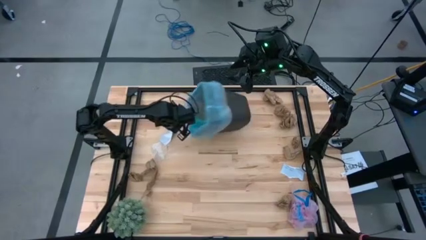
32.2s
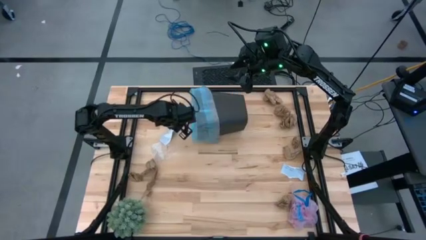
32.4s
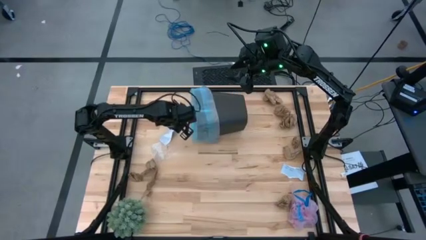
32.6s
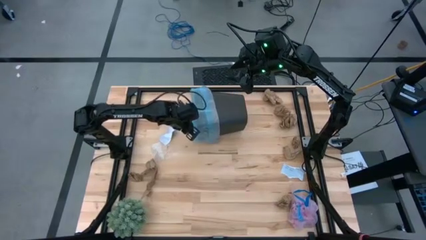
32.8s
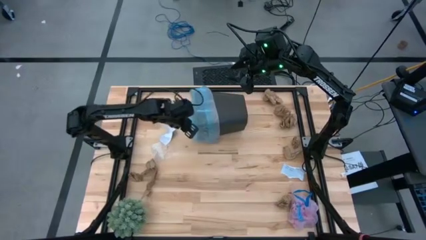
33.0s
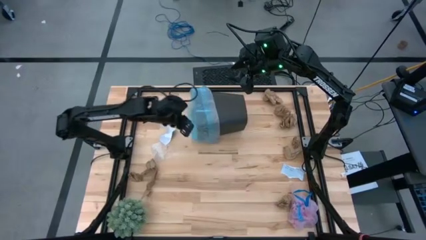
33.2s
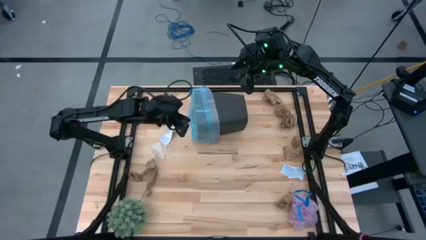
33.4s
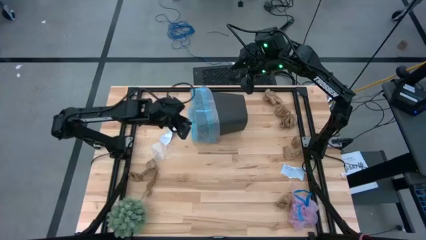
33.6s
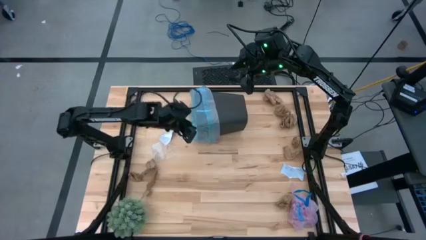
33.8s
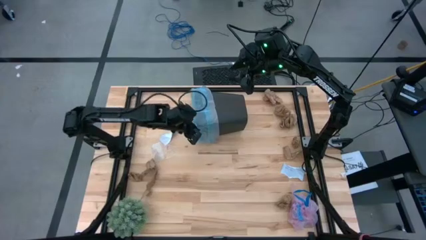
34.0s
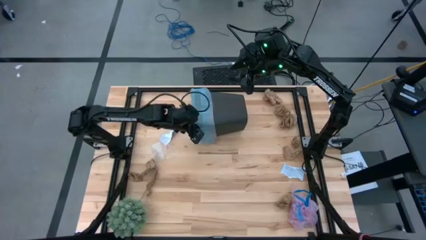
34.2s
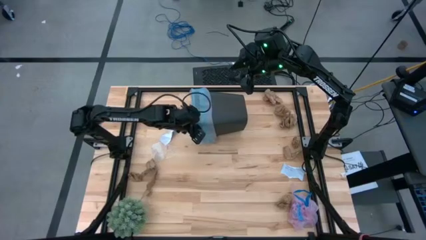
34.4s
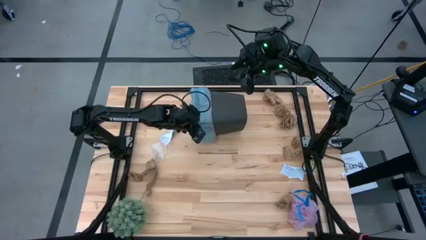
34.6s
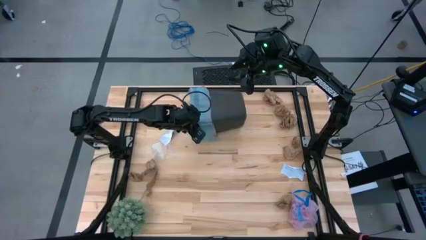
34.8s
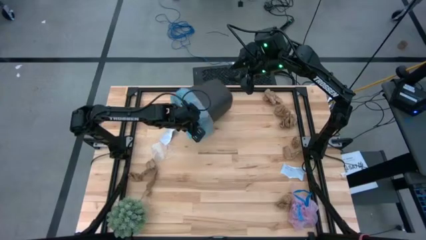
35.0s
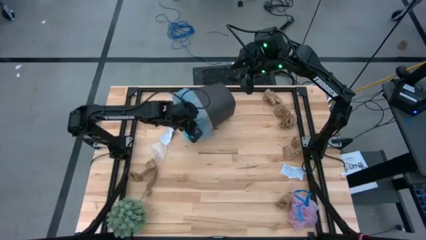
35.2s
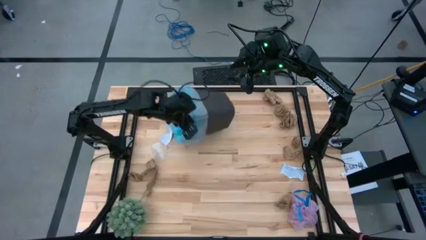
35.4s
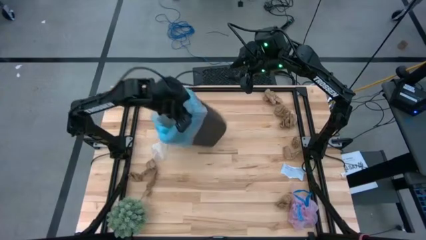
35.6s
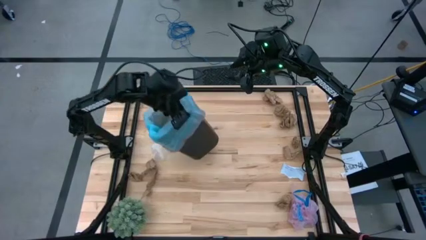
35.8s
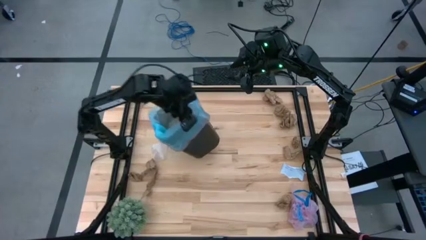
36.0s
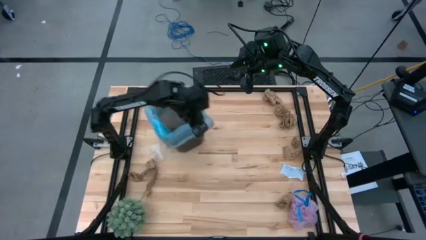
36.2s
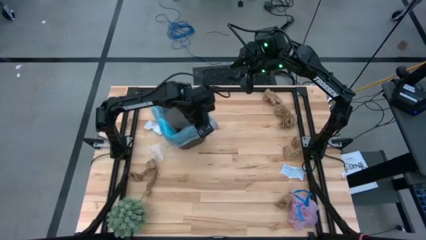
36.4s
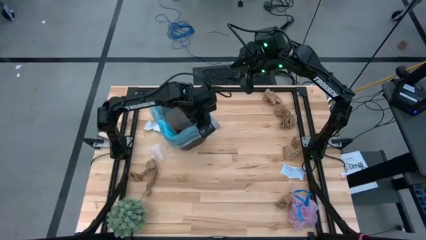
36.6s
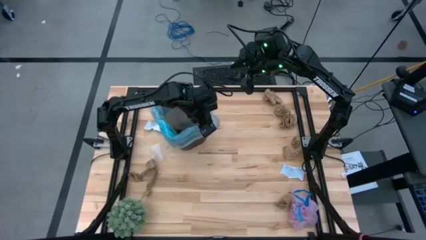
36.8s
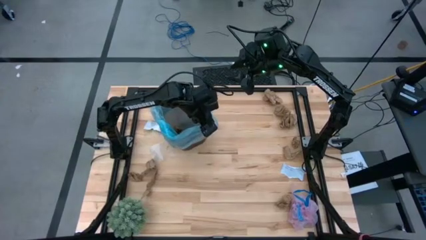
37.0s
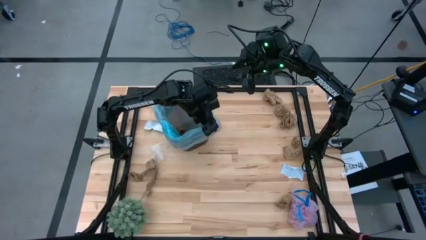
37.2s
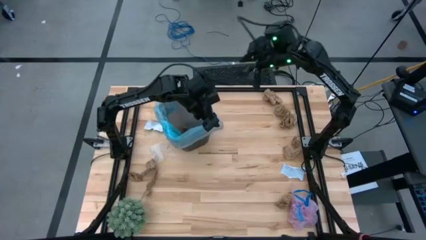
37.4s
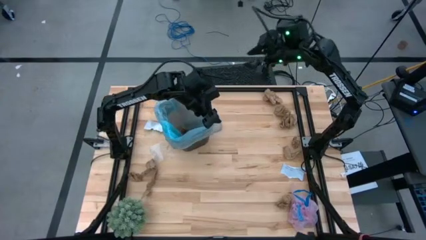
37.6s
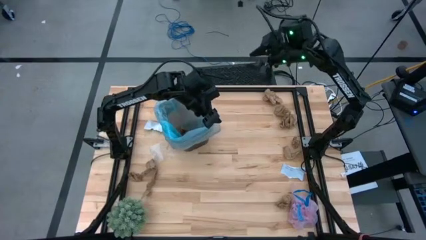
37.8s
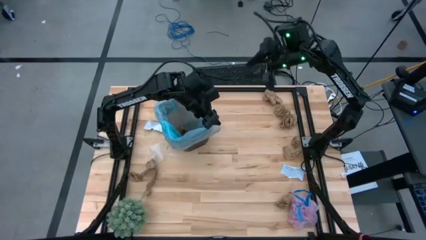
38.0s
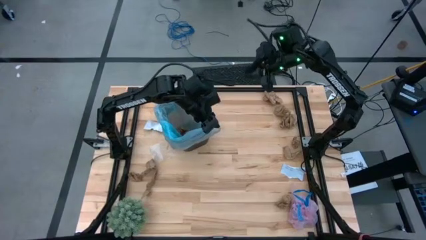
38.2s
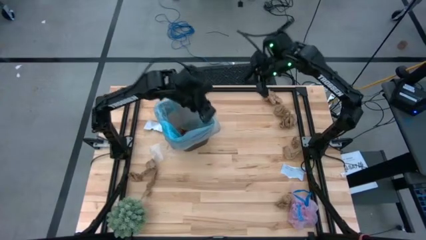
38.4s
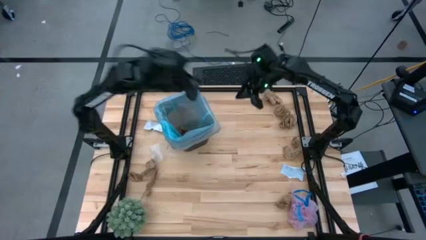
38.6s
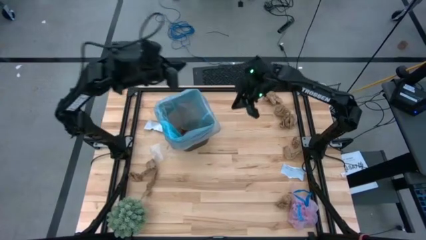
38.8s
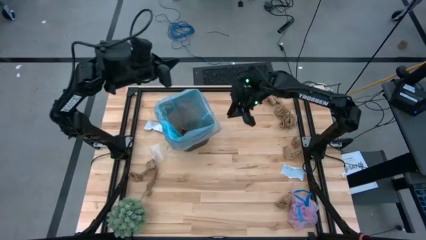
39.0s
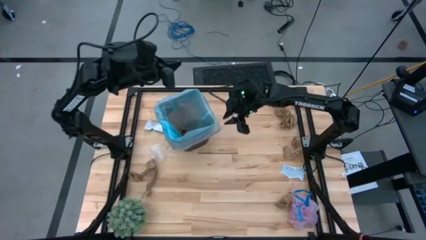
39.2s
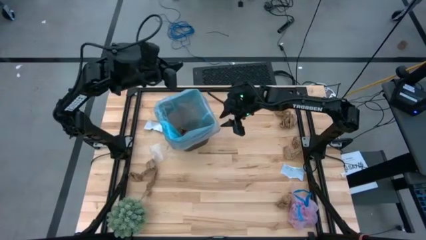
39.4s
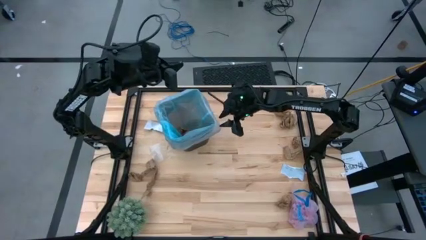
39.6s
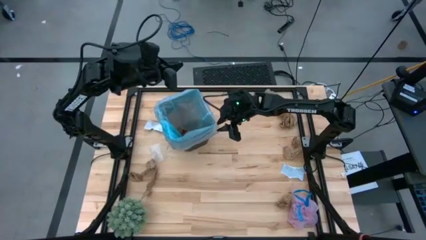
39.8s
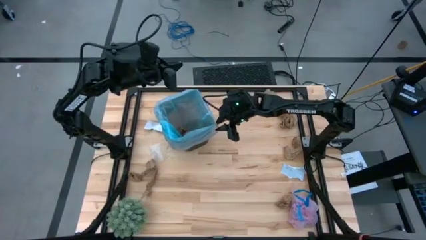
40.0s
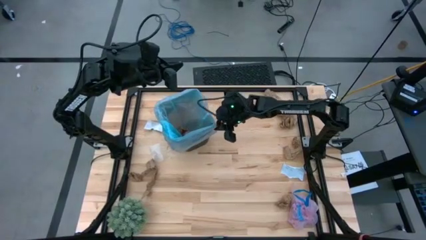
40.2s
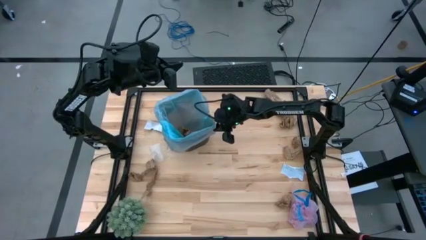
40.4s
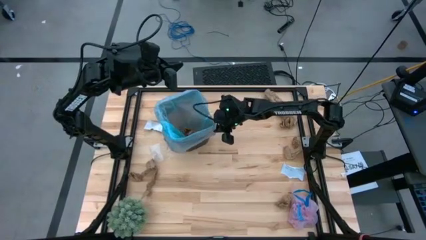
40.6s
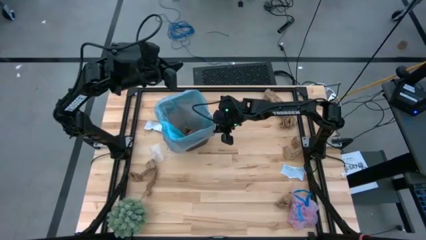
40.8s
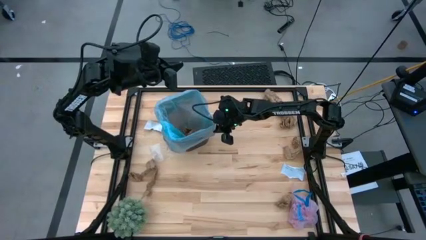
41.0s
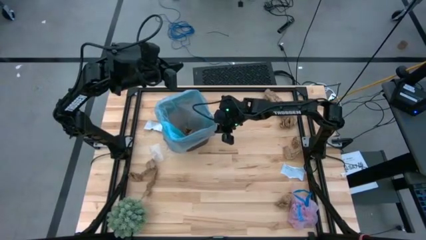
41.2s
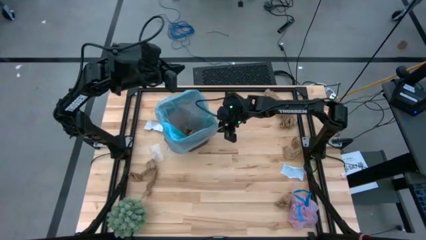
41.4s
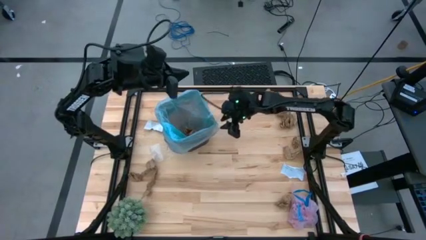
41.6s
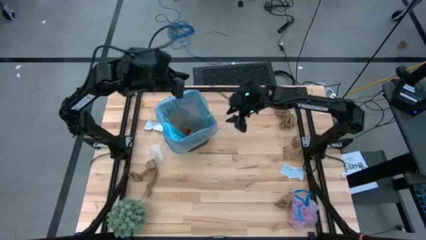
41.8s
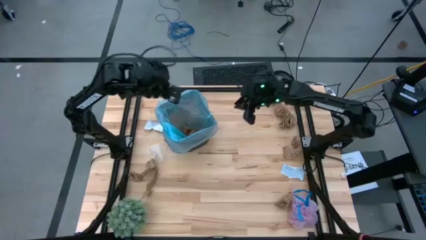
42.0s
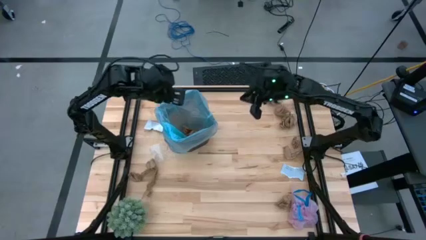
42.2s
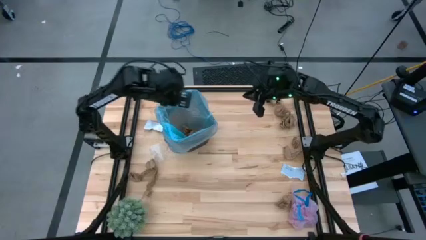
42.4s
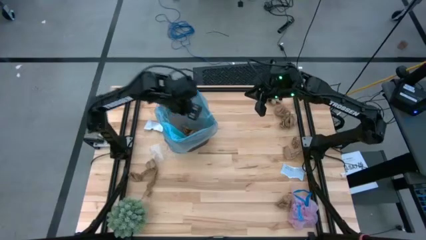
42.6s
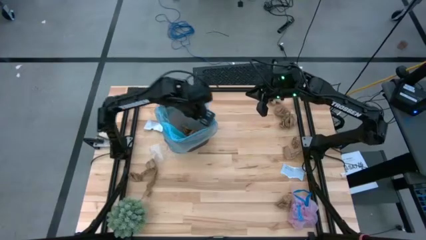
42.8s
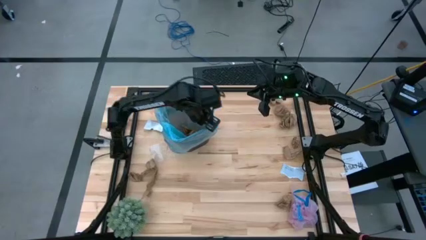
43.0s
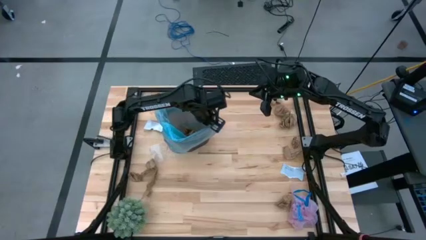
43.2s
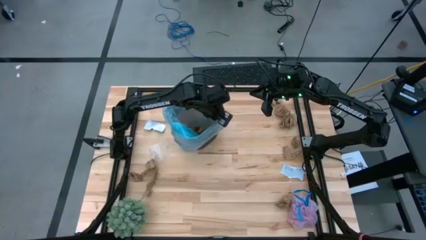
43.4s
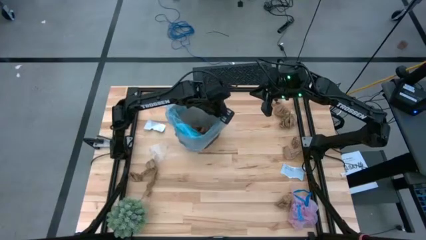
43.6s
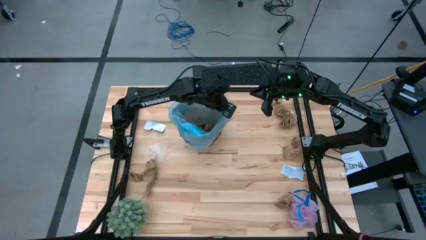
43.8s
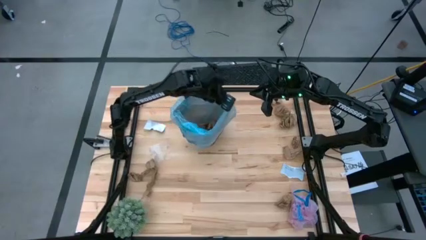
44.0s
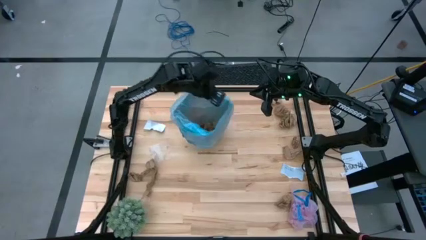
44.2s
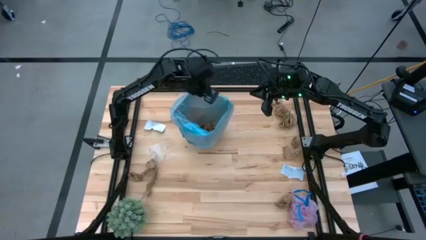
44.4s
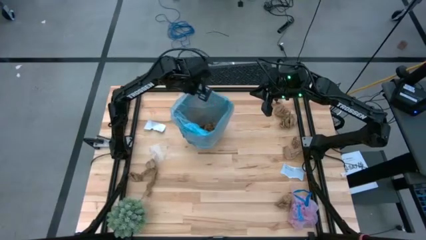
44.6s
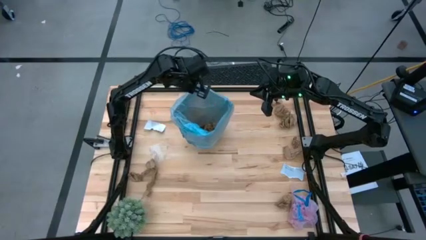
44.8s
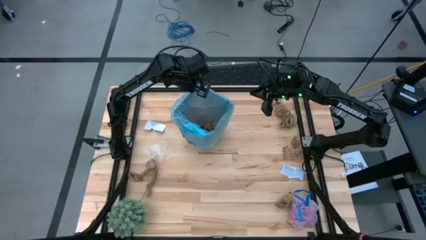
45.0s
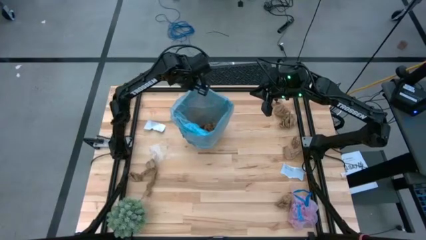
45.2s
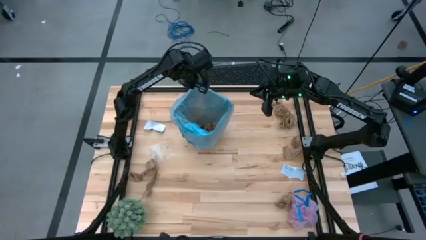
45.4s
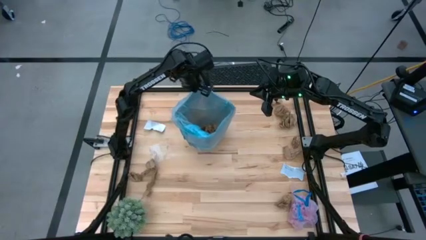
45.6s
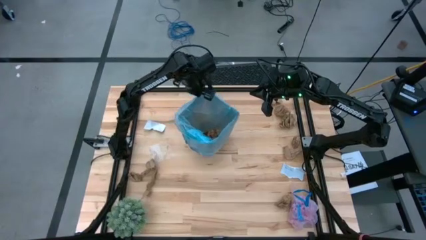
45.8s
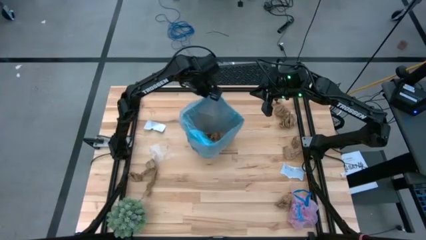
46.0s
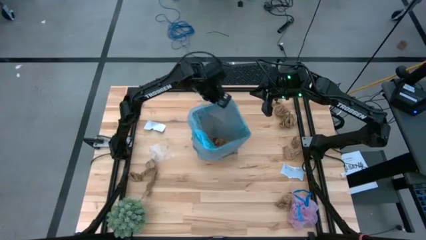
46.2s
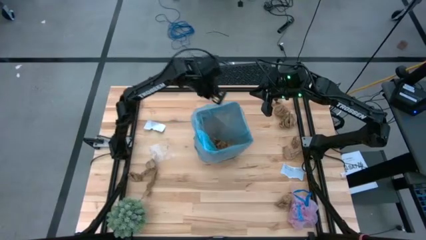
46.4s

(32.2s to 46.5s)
Task: Pick and place trash into bin
Adjust the brown trash bin
